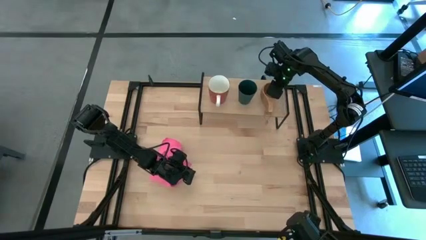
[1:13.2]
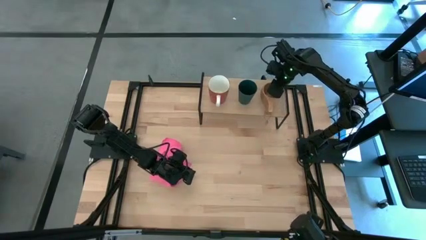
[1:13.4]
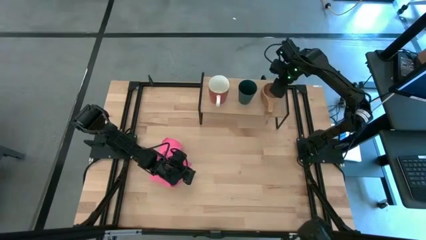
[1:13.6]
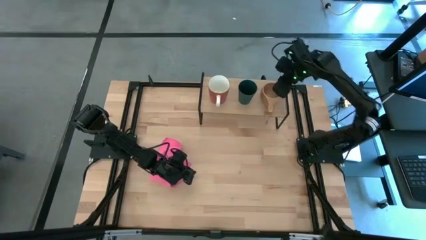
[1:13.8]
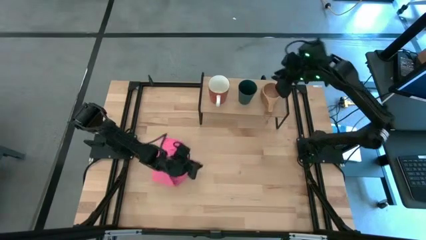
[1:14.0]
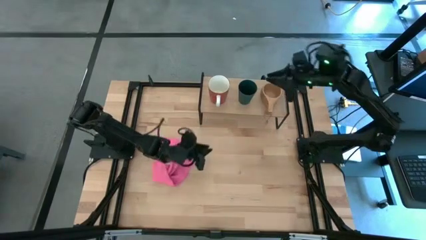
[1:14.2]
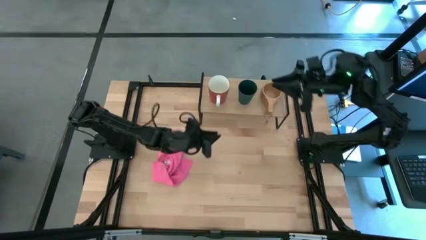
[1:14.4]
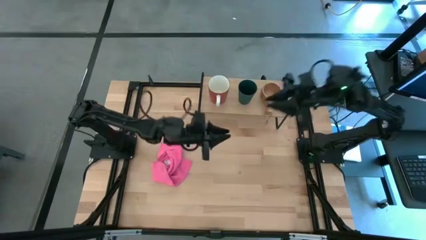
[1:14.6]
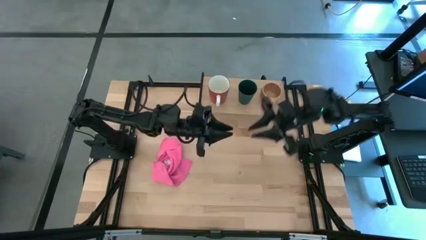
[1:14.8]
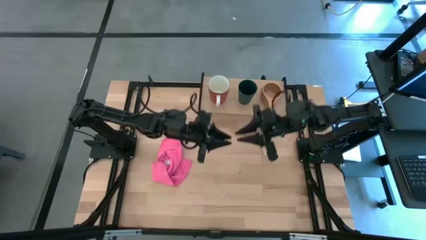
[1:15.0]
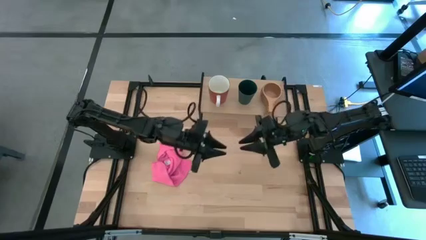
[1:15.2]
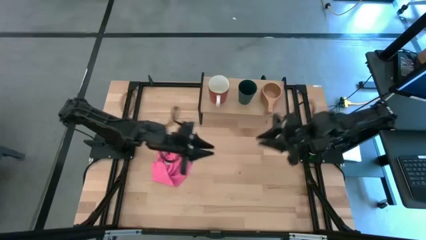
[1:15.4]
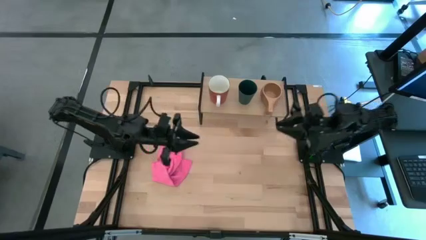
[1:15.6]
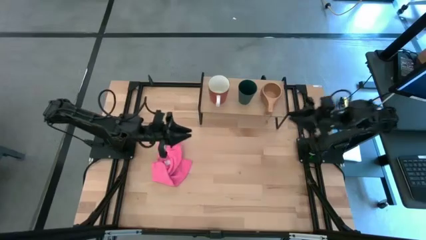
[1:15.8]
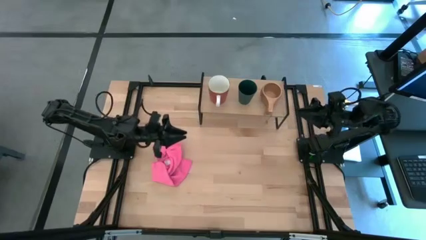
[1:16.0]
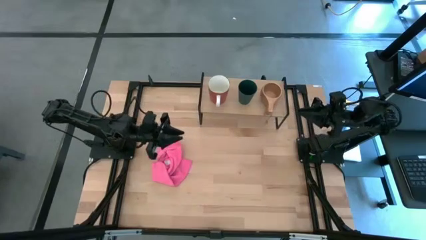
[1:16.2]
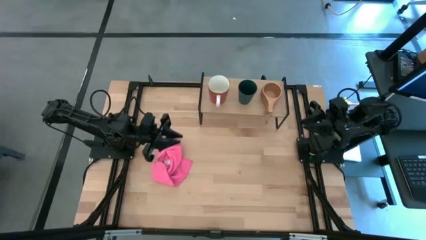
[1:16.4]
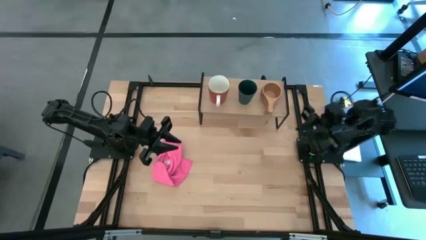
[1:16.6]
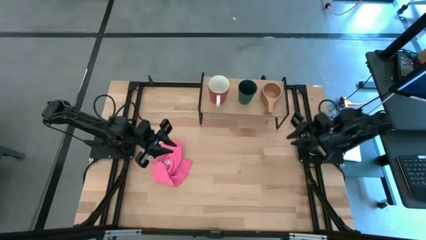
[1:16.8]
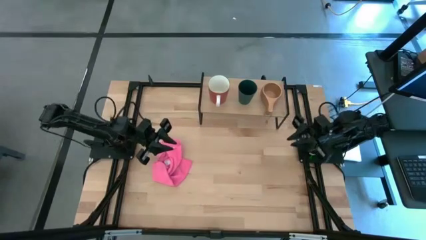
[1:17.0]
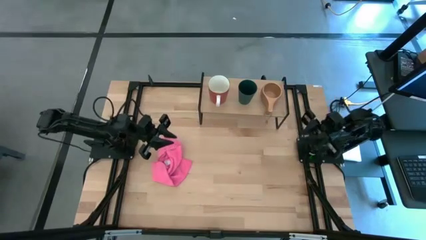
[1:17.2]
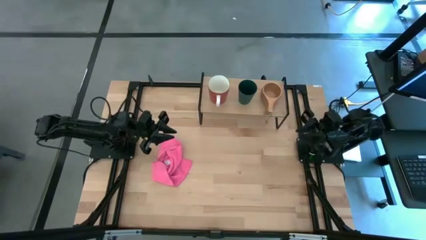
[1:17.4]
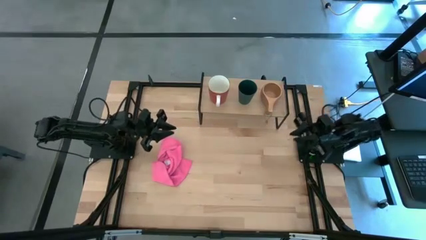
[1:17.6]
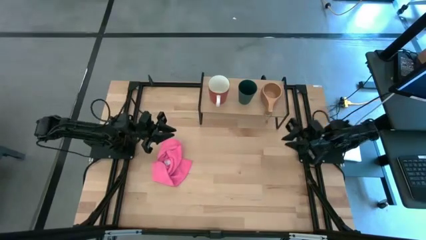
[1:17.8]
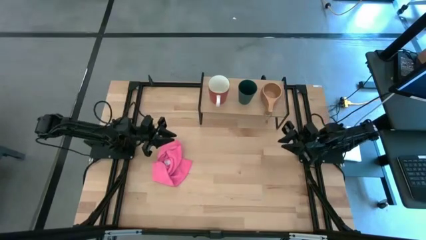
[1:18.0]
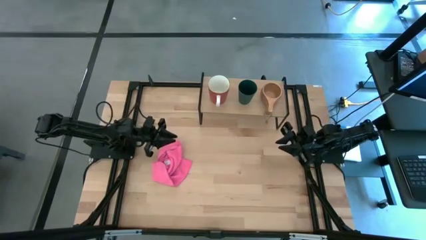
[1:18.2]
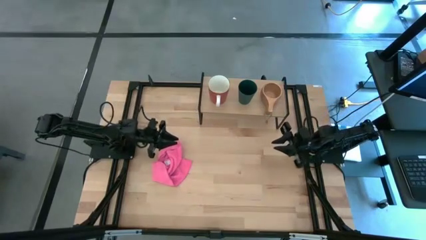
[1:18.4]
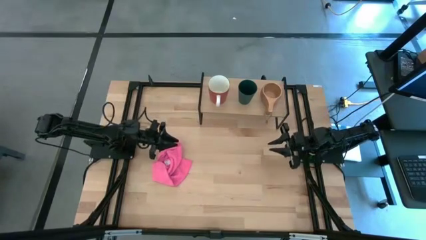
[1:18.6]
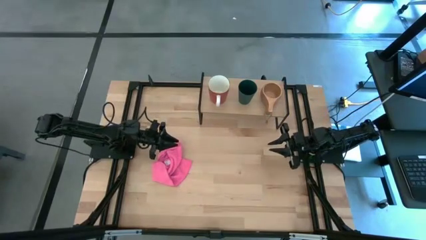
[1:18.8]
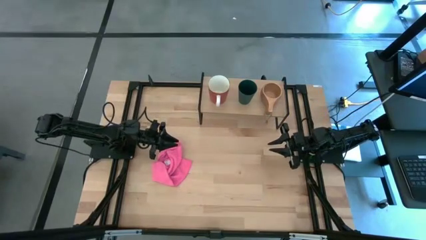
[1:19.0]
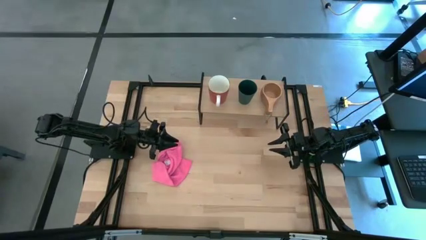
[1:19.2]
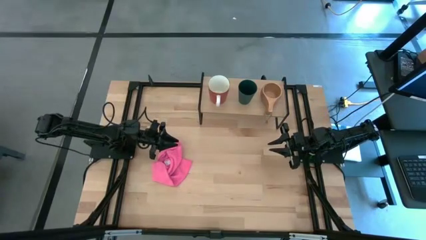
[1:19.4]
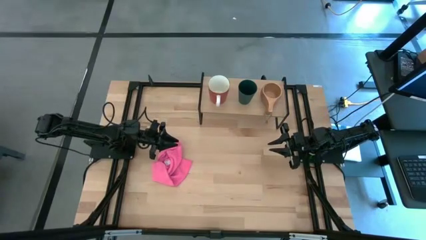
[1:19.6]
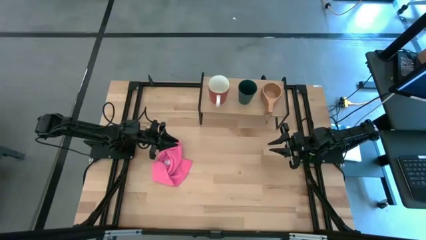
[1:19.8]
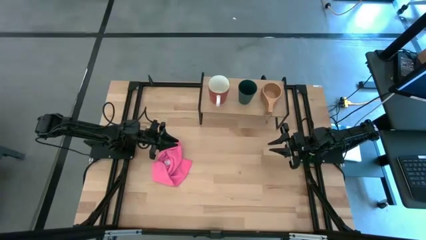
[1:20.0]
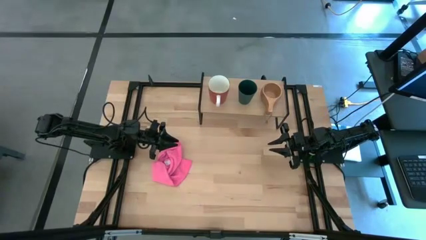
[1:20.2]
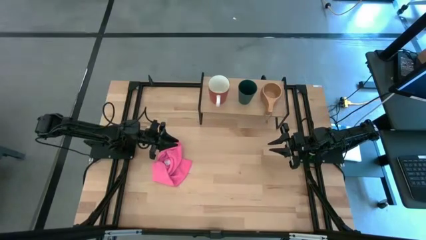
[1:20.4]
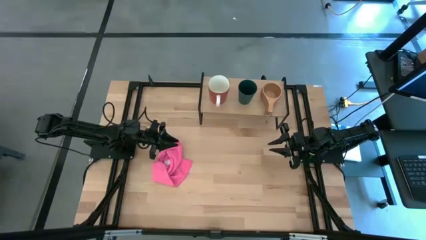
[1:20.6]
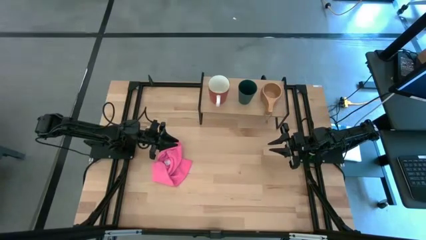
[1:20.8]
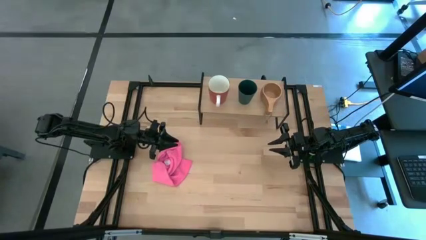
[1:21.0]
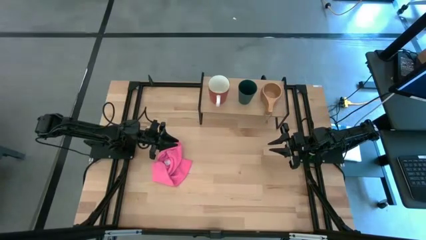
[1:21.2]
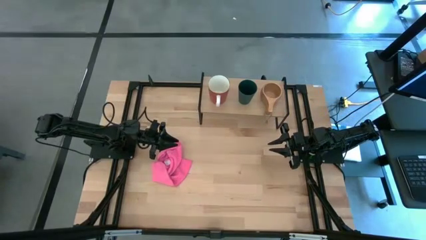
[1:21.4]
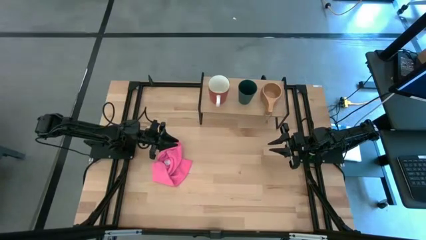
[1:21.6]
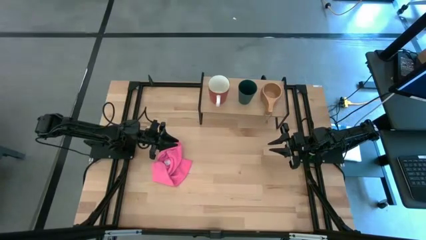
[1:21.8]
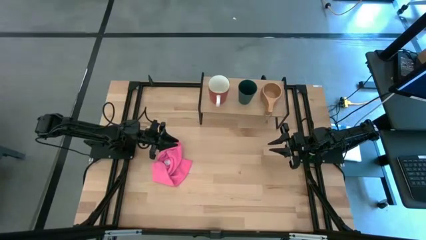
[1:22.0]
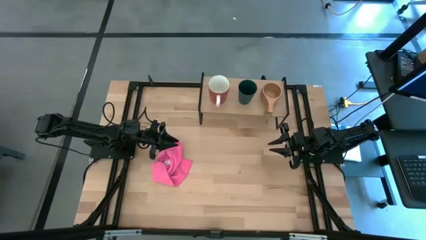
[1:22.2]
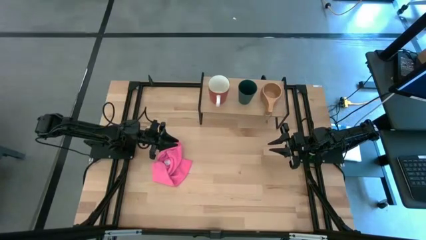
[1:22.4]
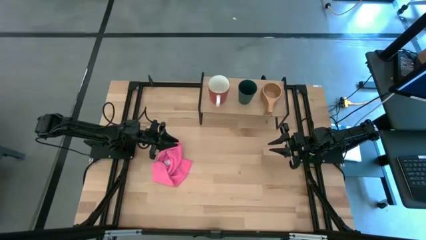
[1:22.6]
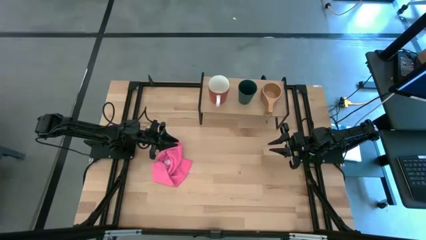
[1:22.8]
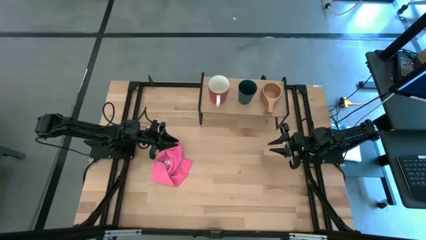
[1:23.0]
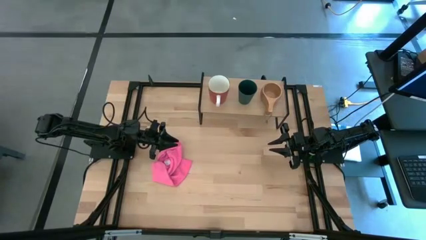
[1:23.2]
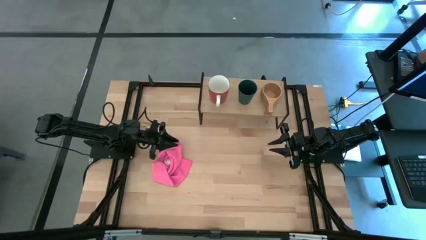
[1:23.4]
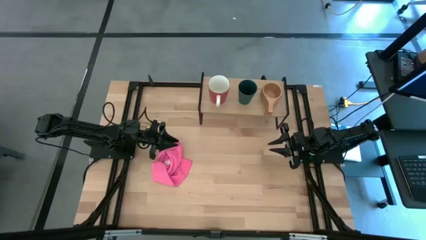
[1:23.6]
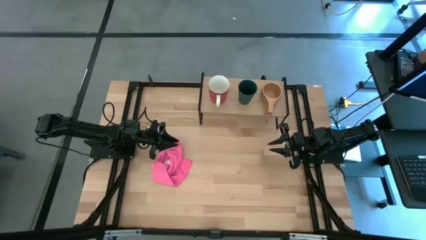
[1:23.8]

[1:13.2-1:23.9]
Task: Stack small to large cups/mugs on shelf
Return to Home Position
